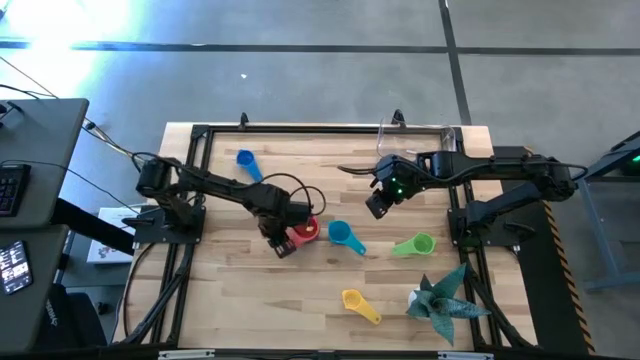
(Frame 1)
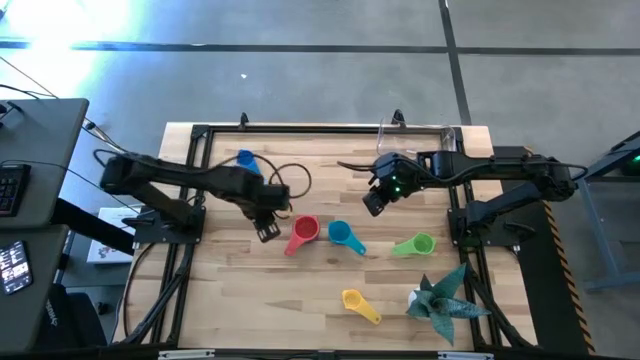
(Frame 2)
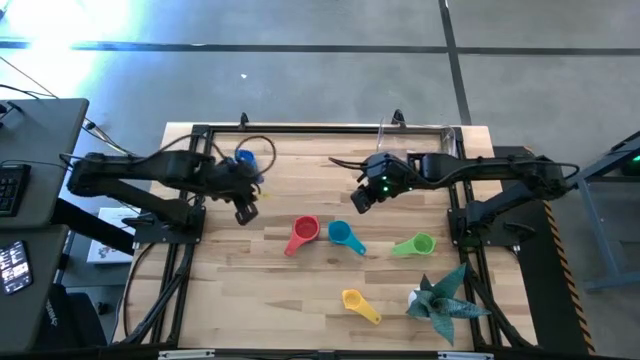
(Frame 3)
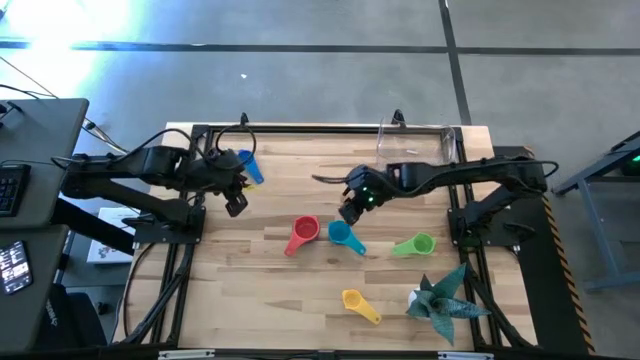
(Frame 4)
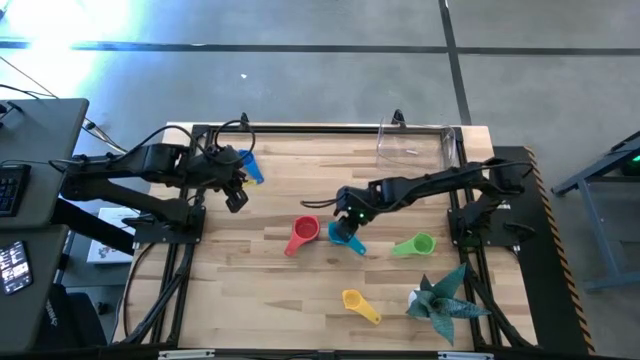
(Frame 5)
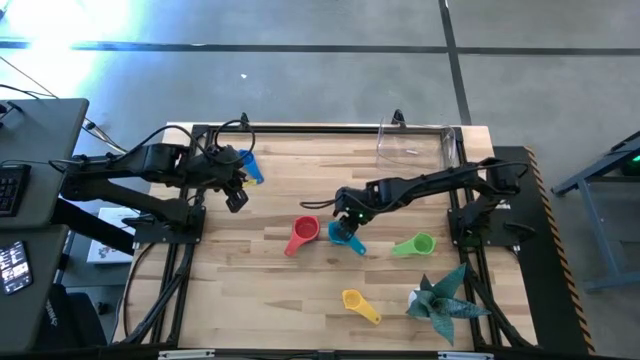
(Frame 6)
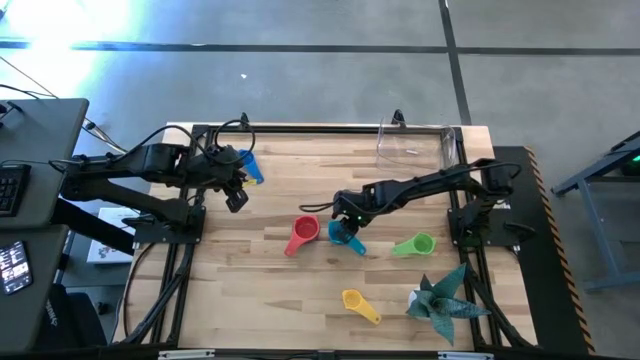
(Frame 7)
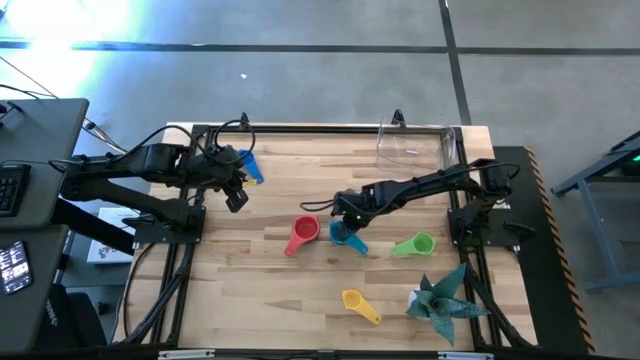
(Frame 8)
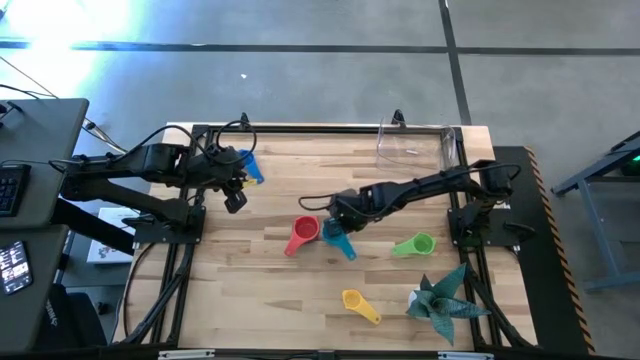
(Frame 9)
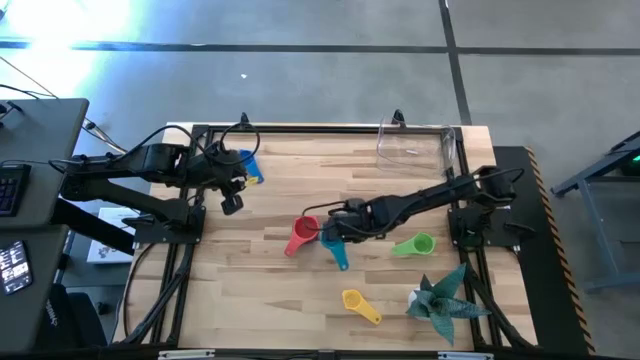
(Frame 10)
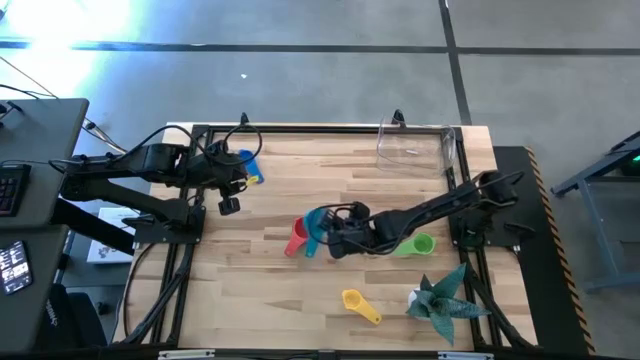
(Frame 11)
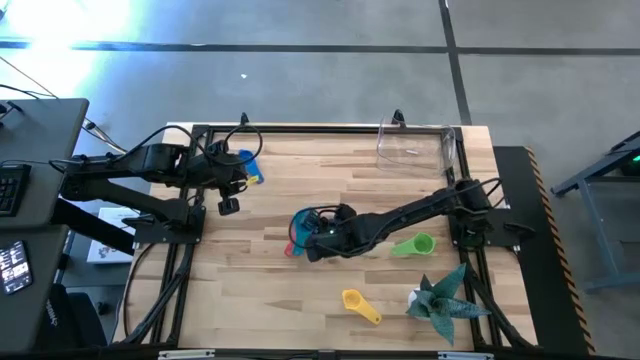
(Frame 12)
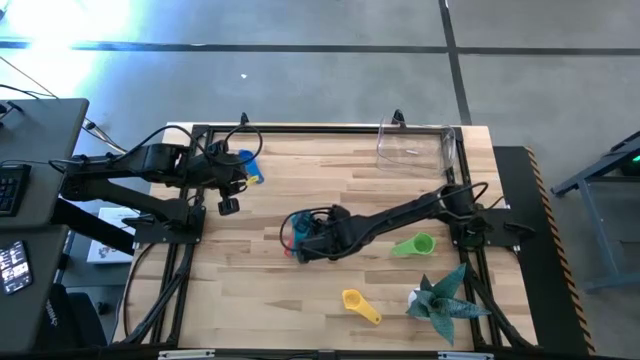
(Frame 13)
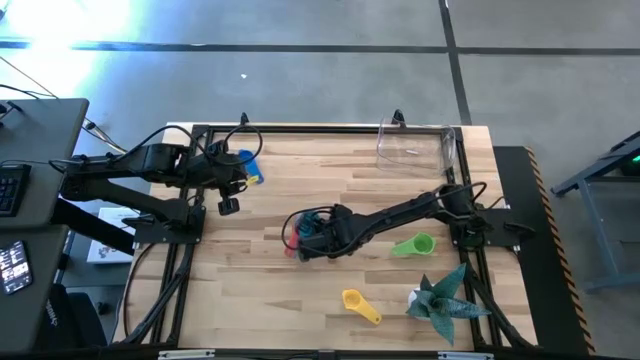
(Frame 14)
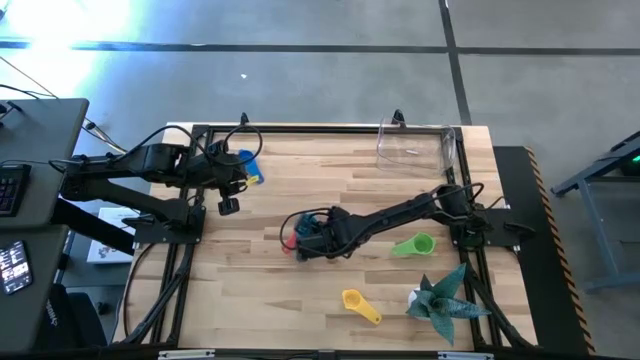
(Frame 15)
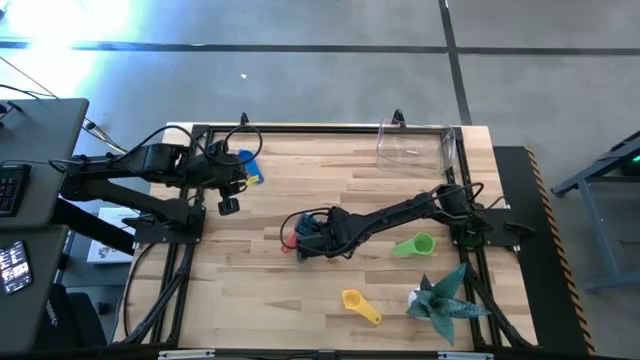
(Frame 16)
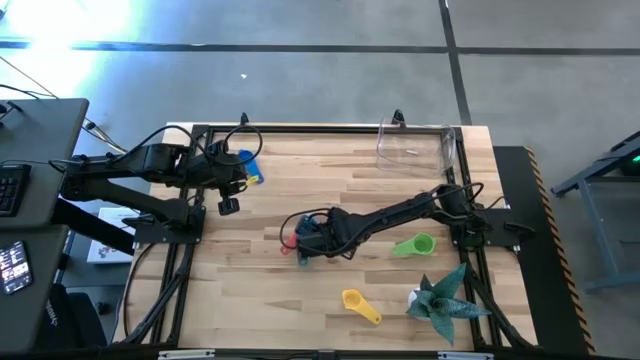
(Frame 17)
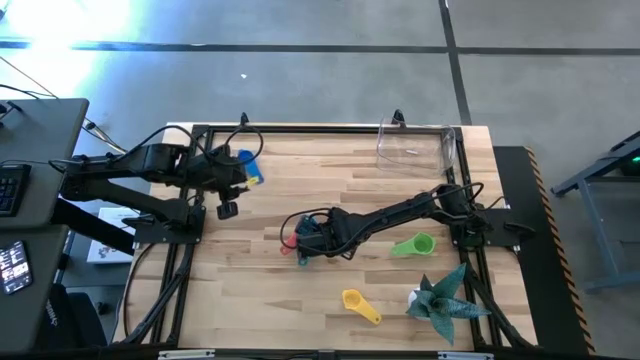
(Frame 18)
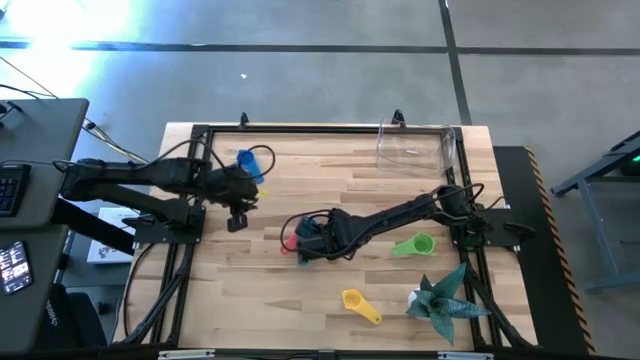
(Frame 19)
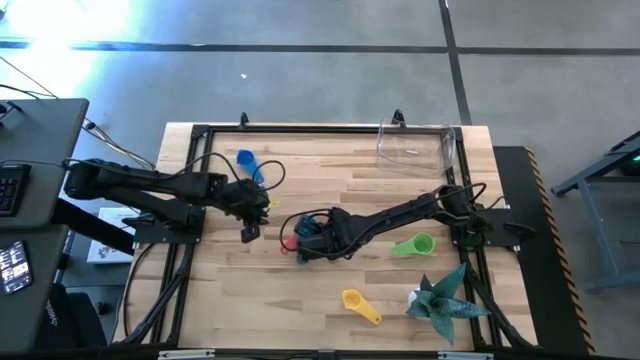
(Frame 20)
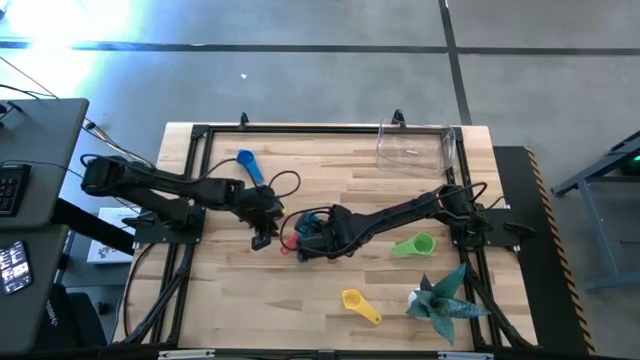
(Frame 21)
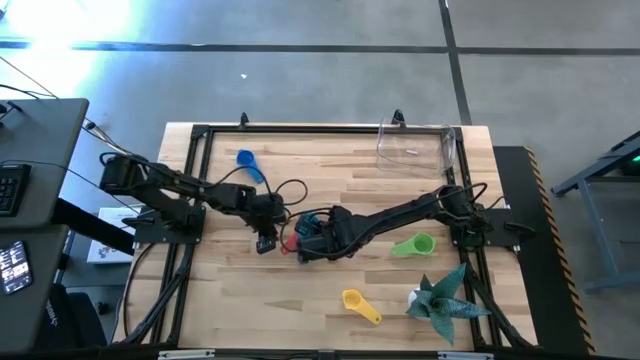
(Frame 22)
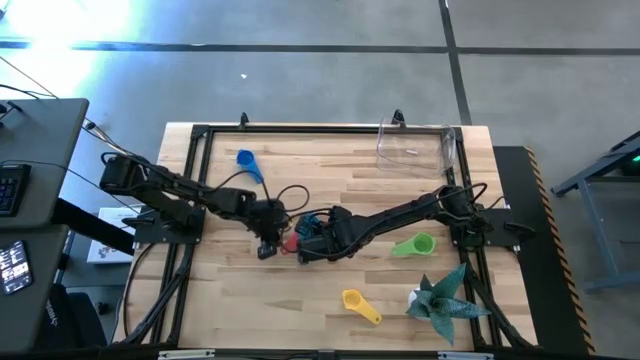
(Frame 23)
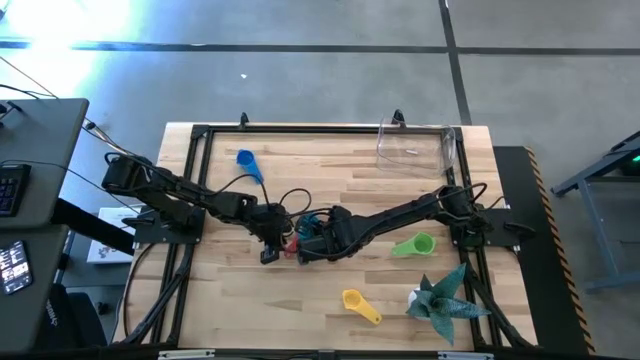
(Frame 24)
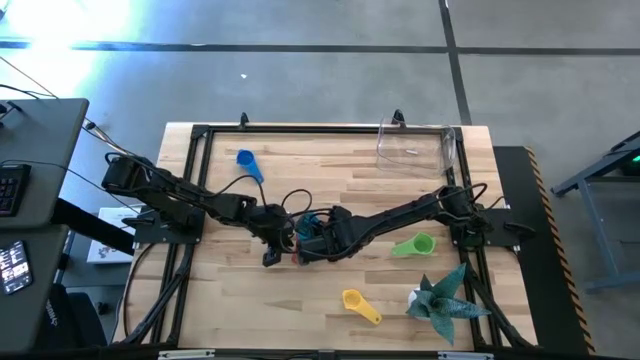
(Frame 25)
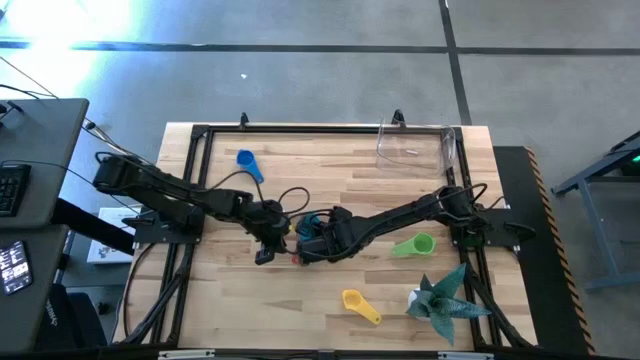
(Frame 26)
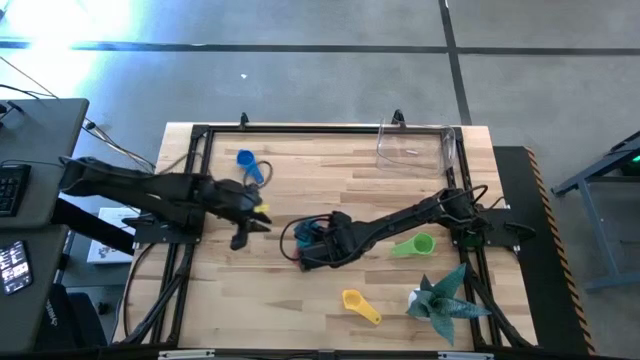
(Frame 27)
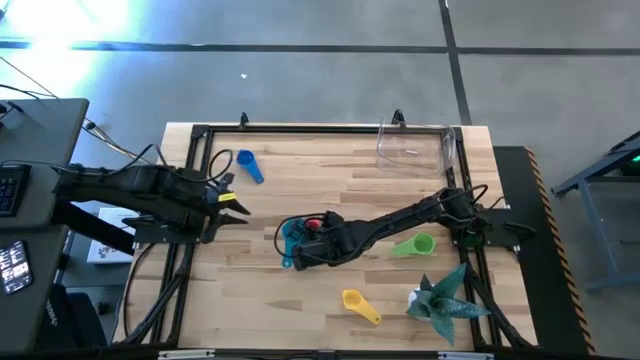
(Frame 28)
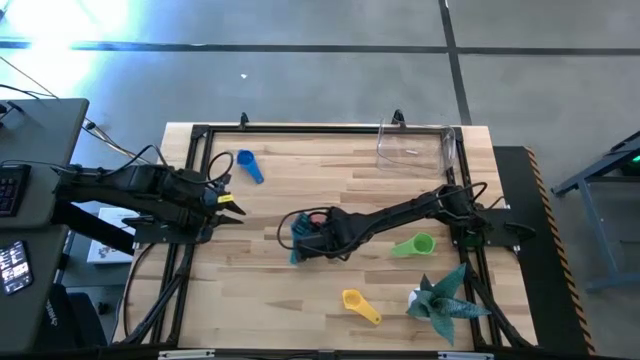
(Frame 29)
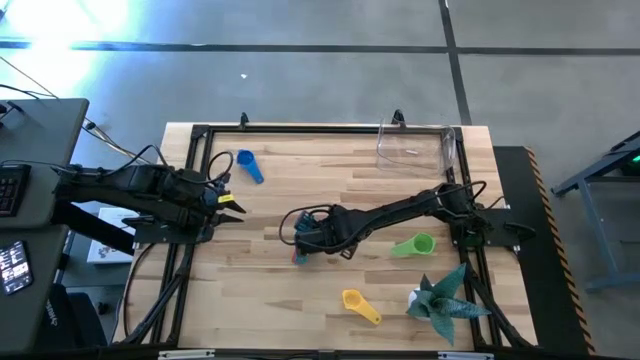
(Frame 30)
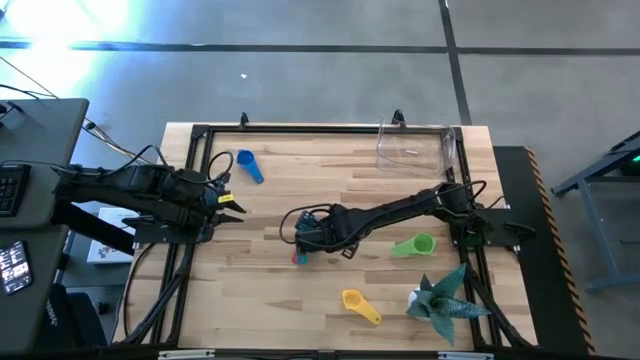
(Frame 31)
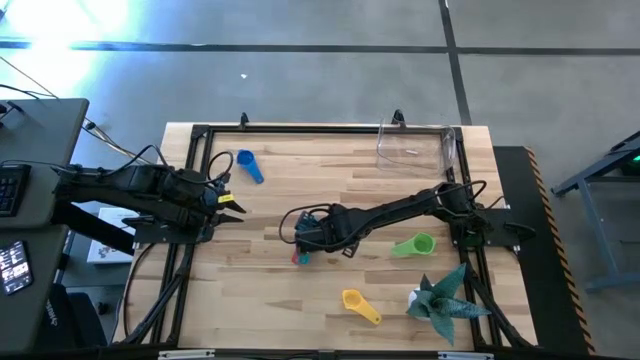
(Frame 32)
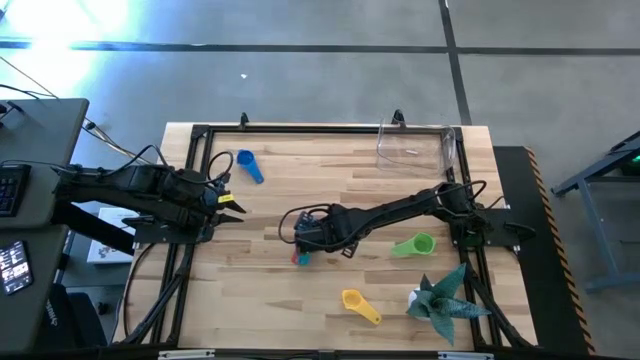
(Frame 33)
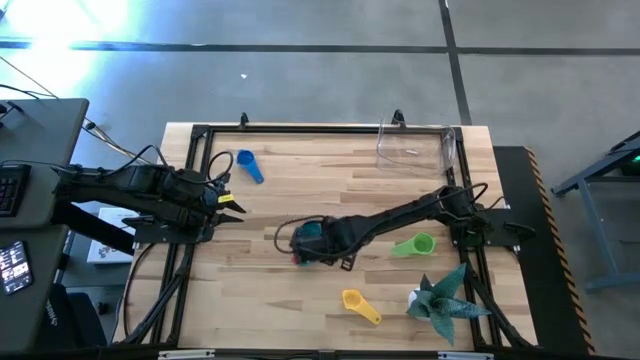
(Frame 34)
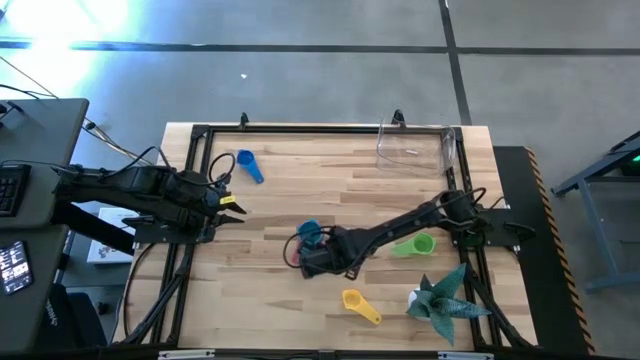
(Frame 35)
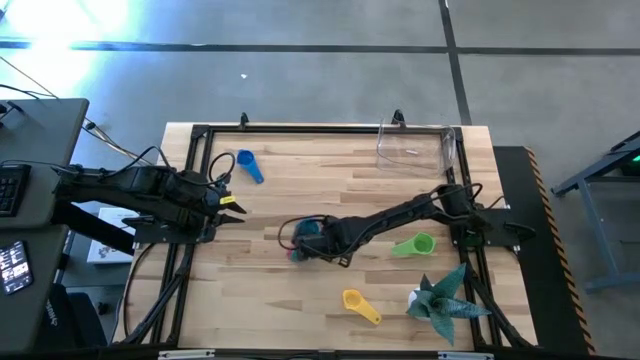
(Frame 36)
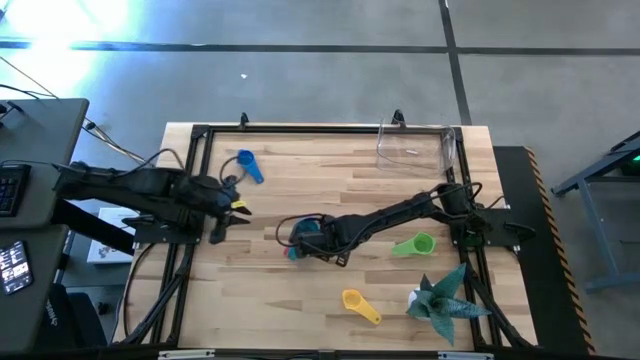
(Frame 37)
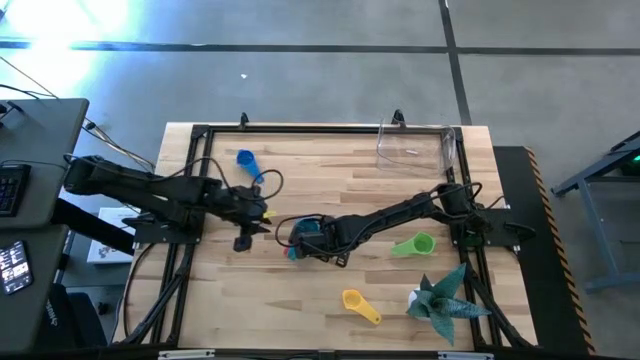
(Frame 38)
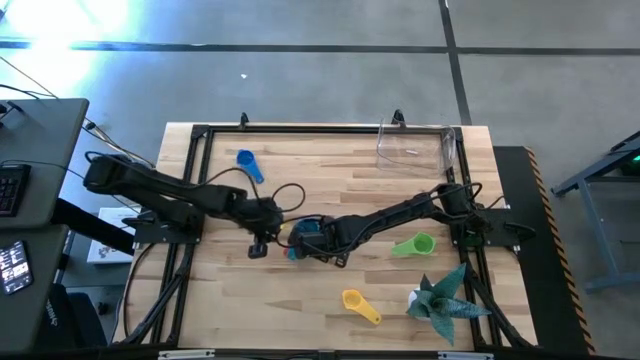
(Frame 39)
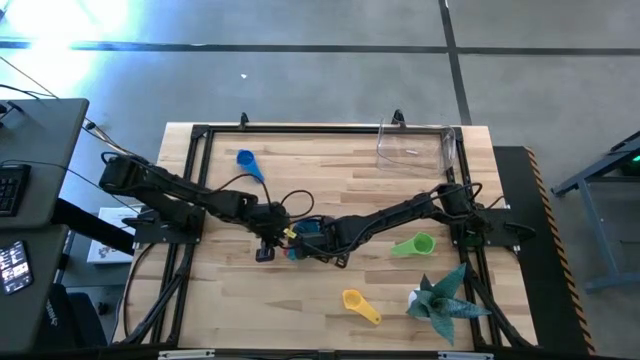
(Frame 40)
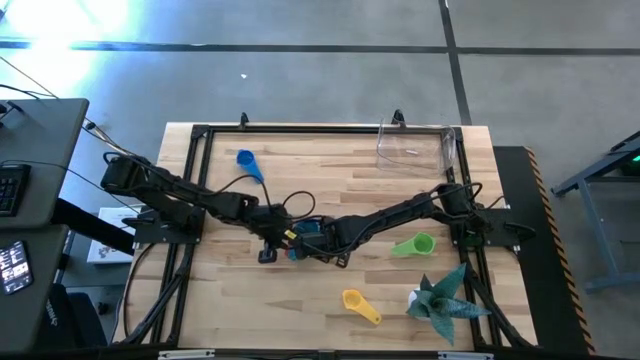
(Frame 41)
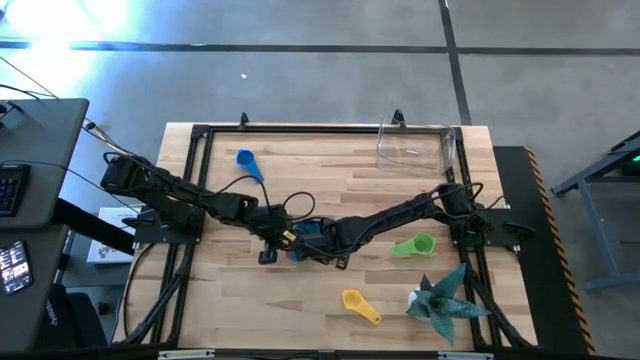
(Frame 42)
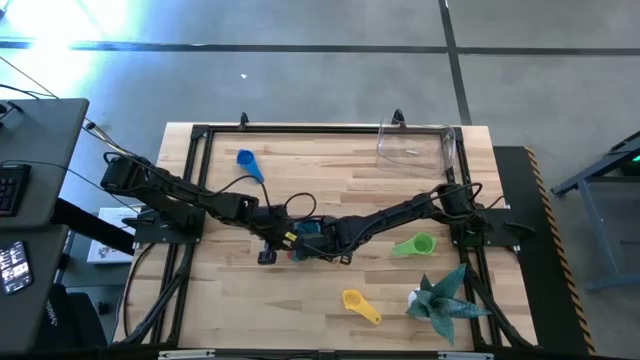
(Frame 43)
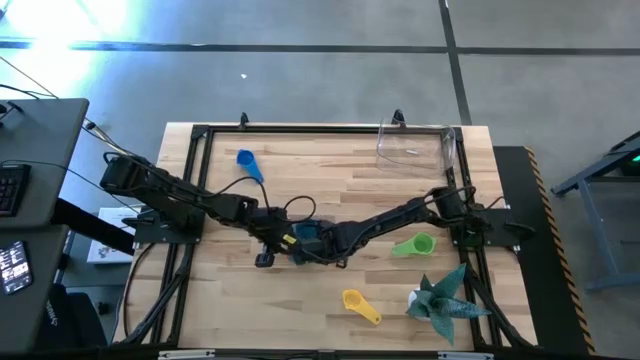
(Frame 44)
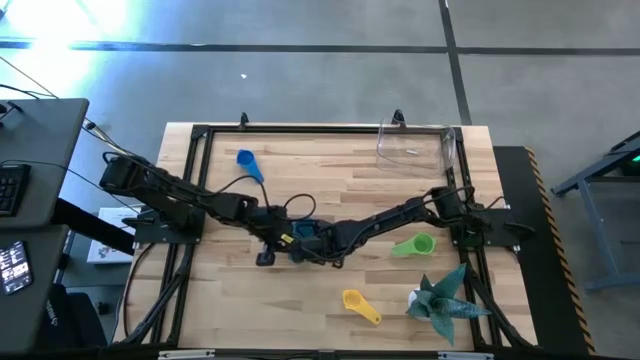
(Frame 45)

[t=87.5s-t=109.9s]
Task: Nest measuring cups in basket
Stack the light blue measuring cup on top of the red measuring cup
